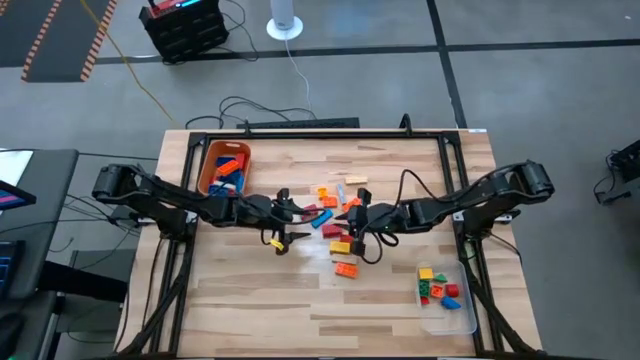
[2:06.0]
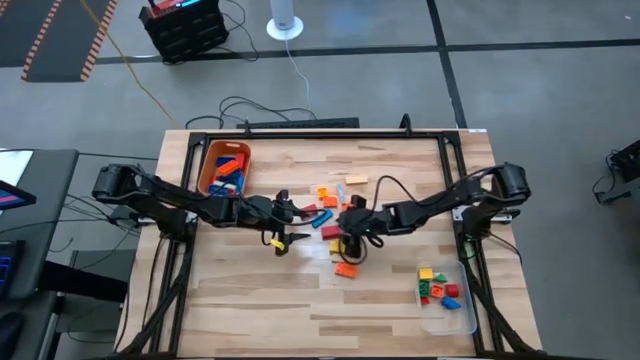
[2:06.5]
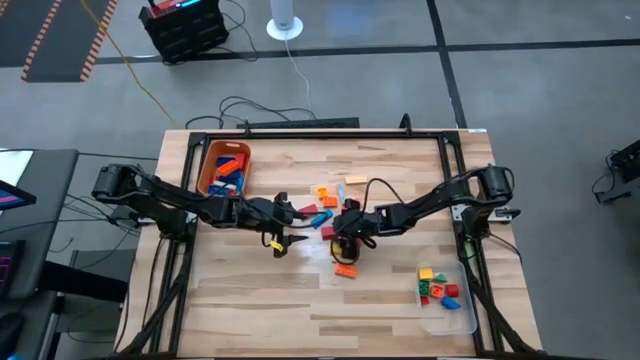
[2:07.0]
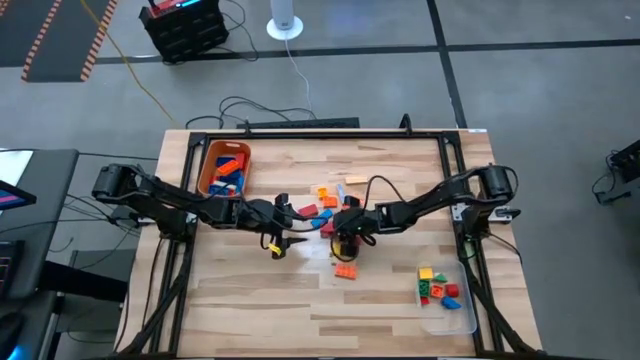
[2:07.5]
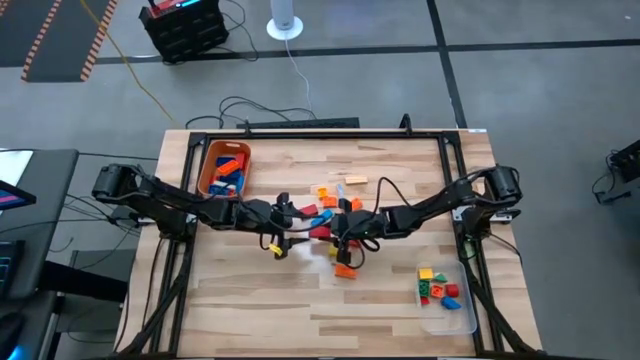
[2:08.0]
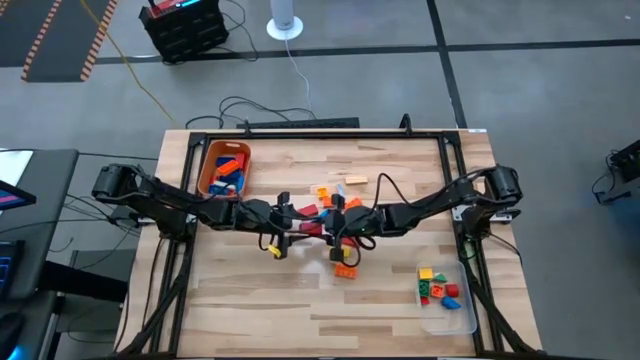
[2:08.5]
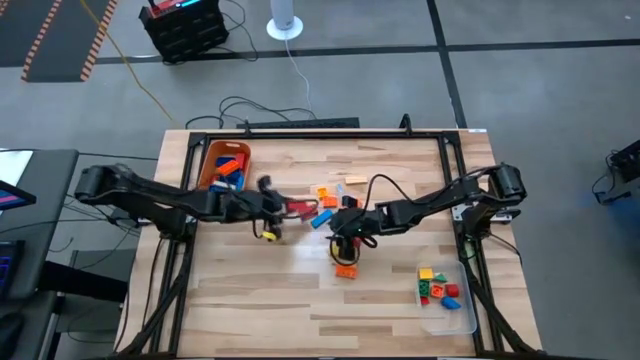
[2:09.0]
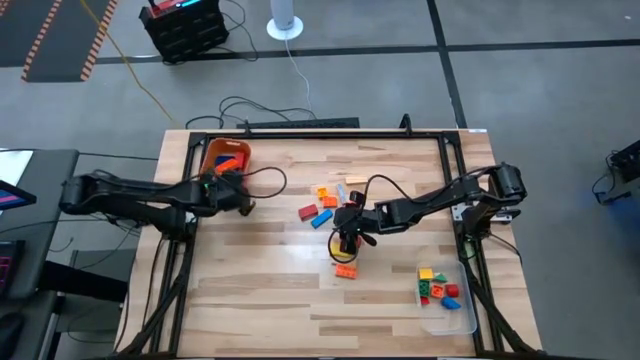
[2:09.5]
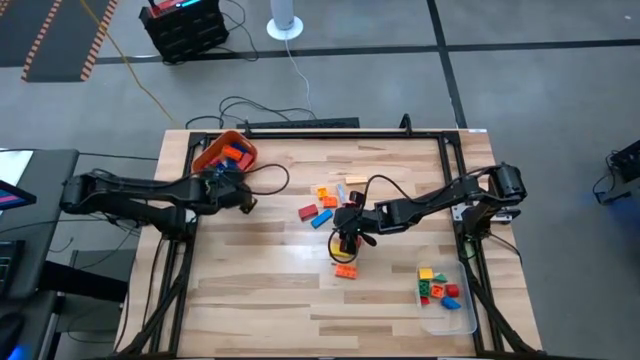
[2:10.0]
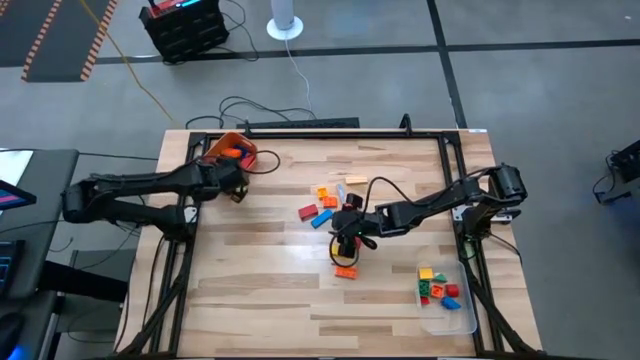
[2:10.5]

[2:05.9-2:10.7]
Task: Sort blocks by size
Put the large red wooden block into the orange bin

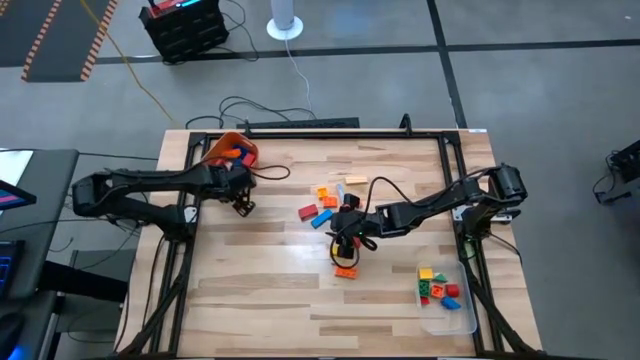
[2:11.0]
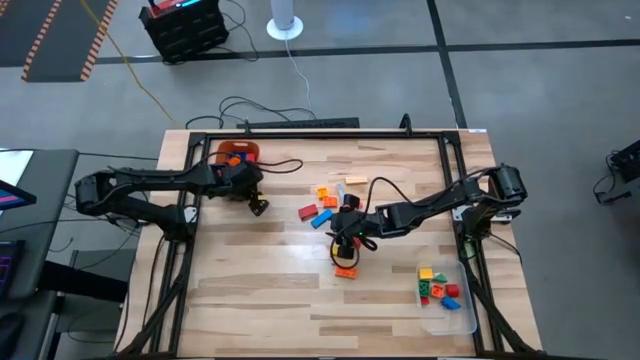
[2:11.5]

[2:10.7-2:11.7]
Adjust the orange bin

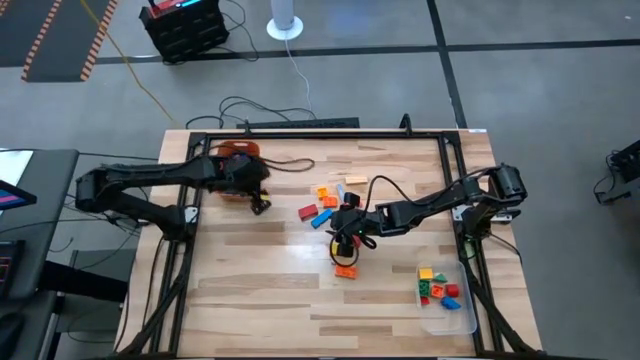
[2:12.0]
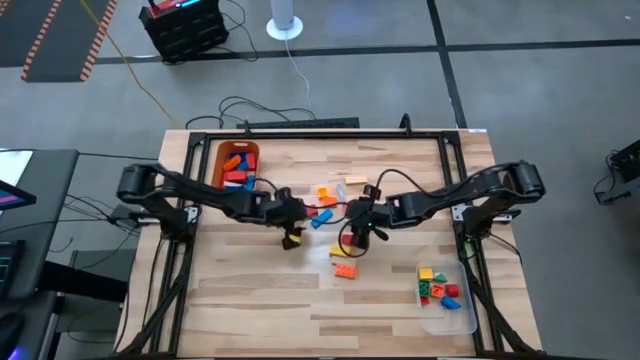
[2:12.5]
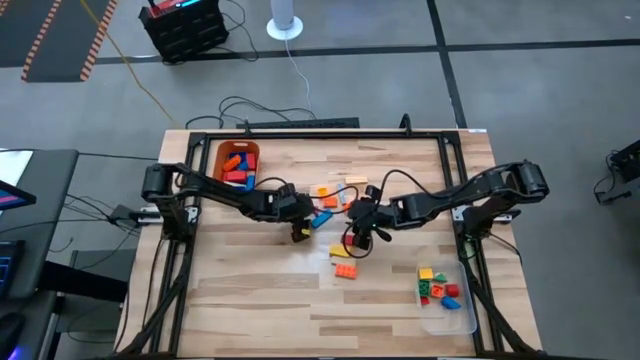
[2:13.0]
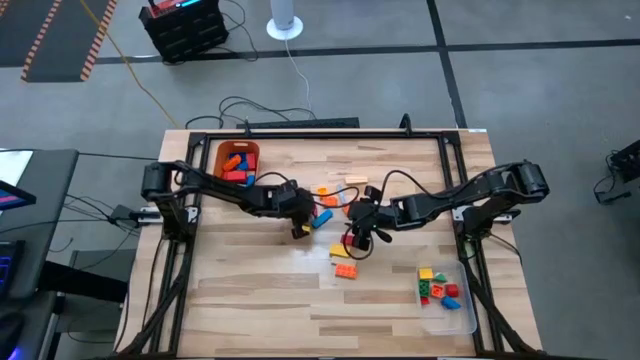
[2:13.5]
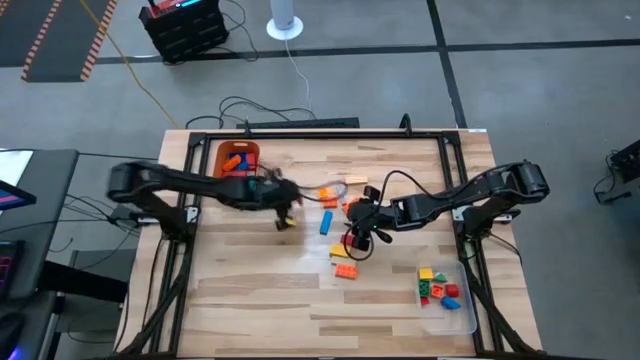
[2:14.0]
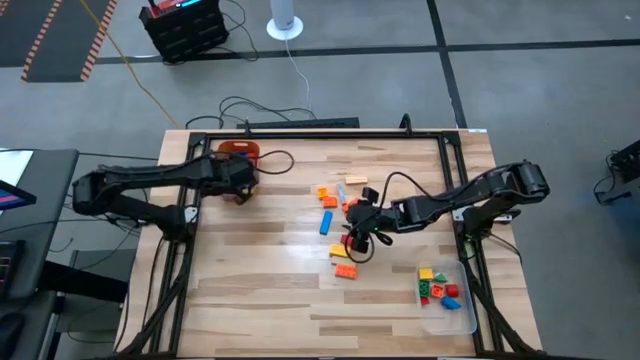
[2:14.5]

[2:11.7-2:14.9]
Put the large red wooden block into the orange bin

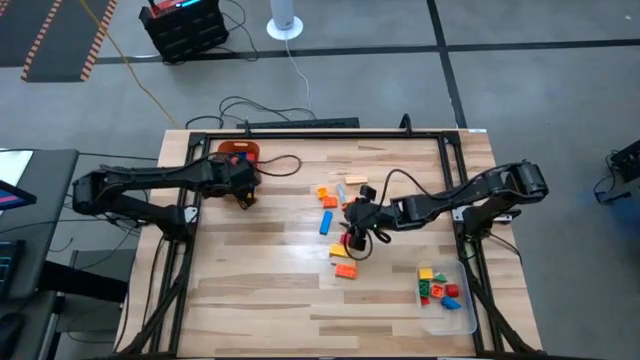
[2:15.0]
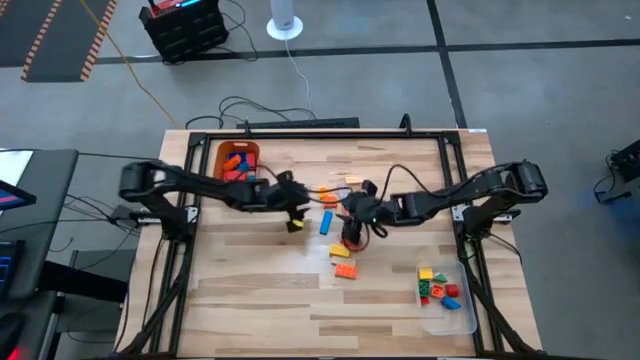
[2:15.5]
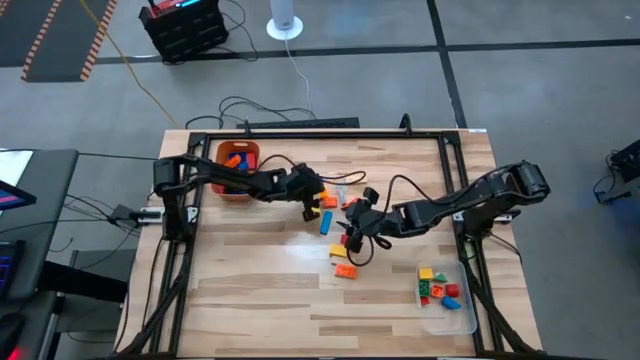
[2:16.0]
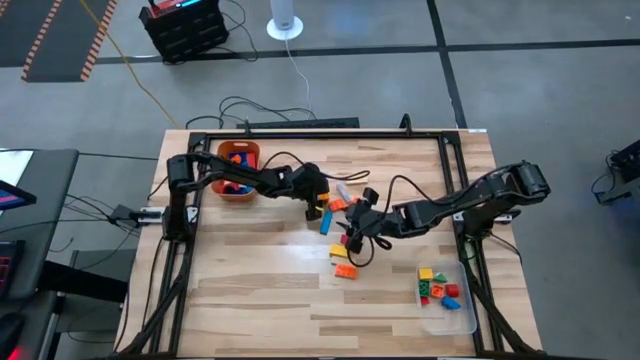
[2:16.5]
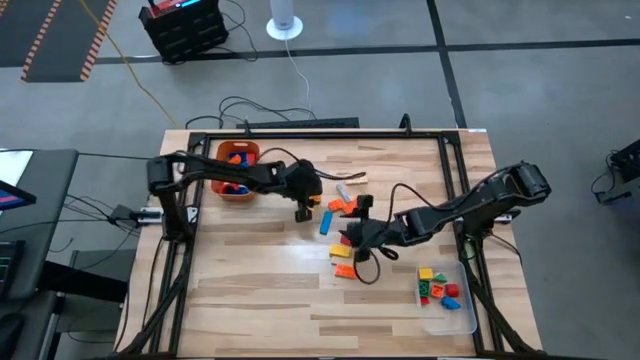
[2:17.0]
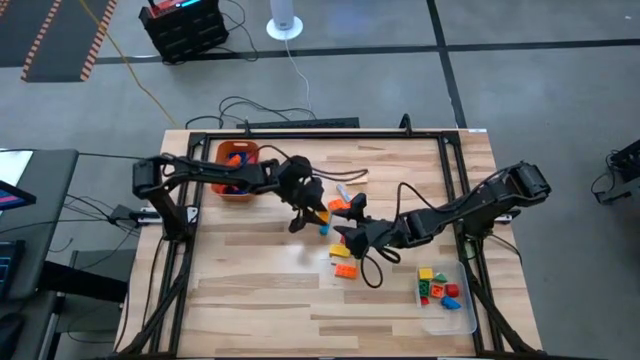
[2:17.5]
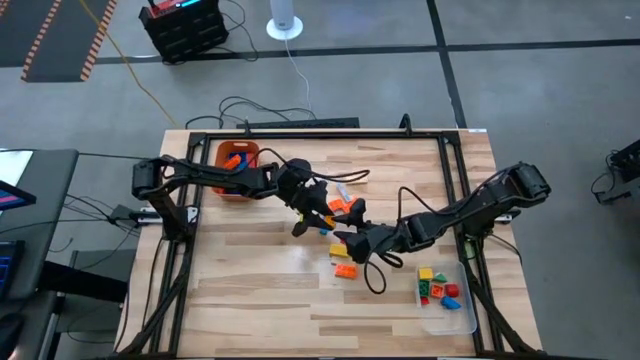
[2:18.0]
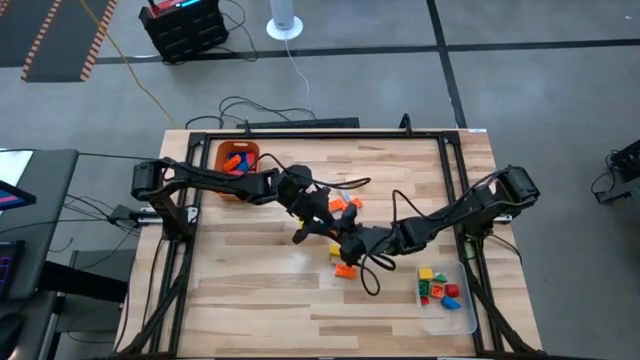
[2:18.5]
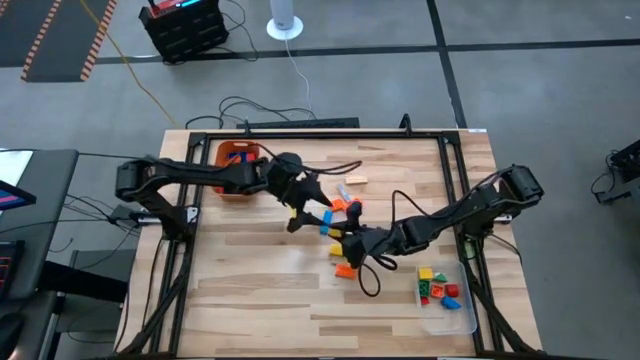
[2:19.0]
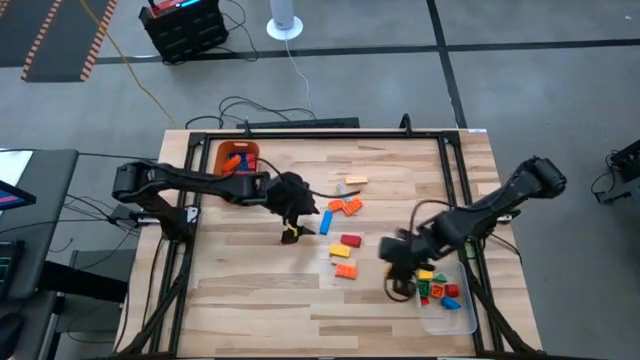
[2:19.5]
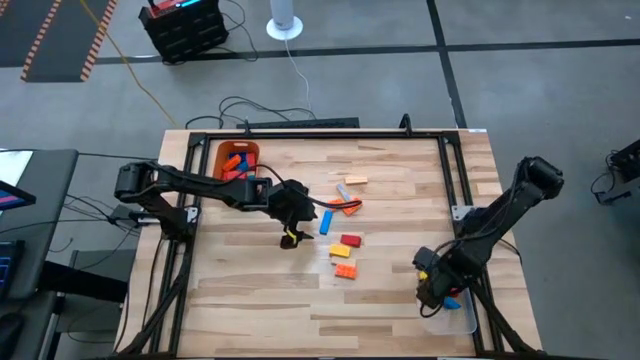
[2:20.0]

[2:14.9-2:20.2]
Put the small yellow game piece into the transparent bin

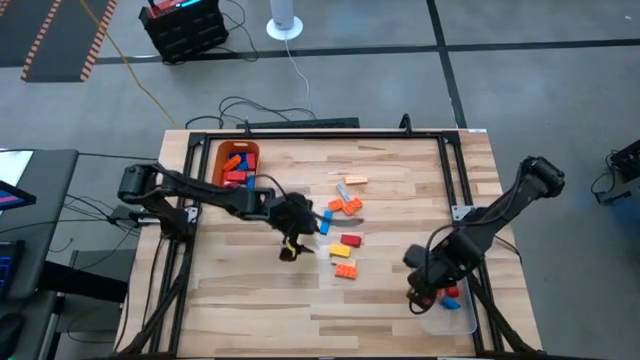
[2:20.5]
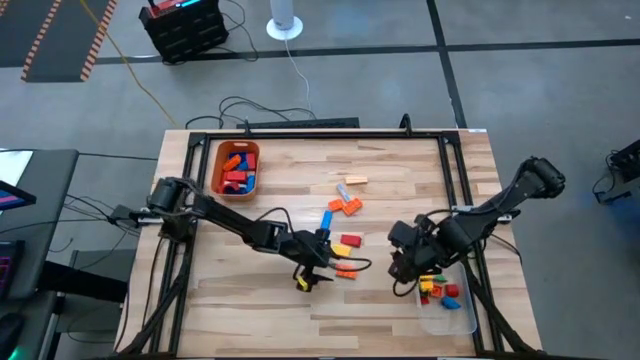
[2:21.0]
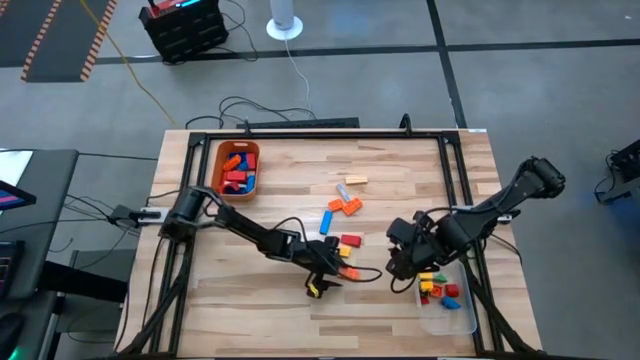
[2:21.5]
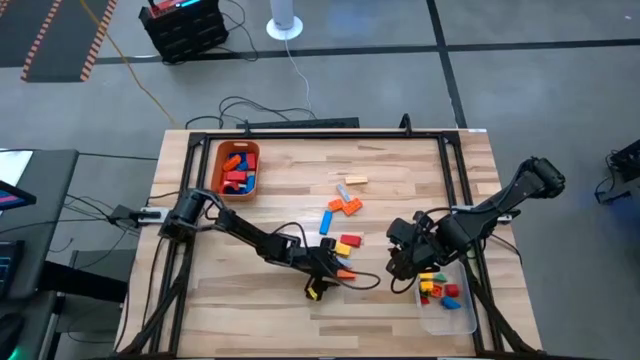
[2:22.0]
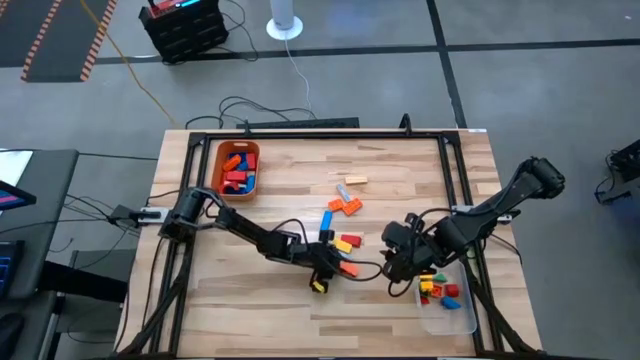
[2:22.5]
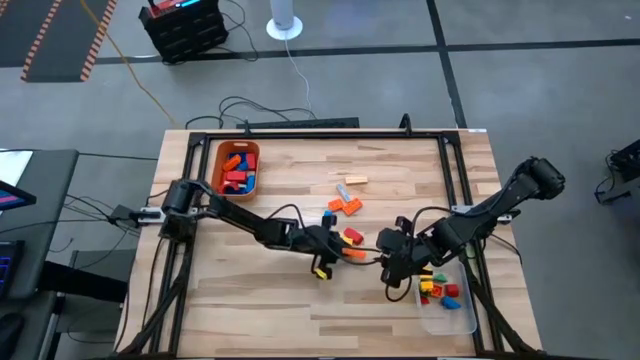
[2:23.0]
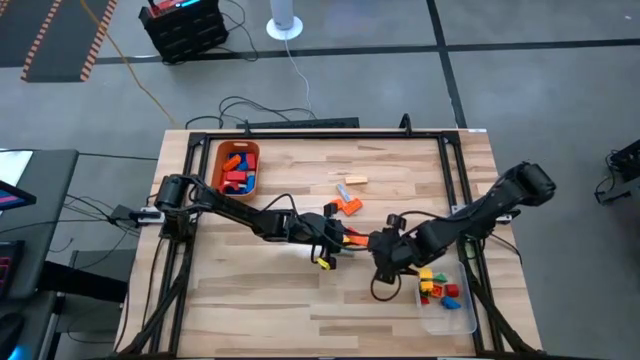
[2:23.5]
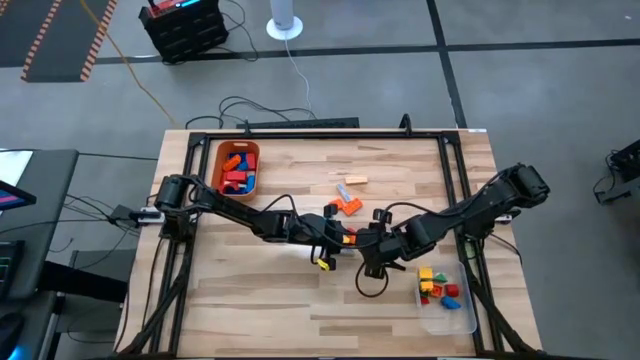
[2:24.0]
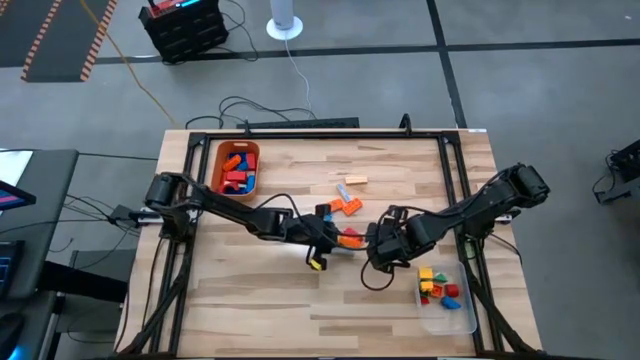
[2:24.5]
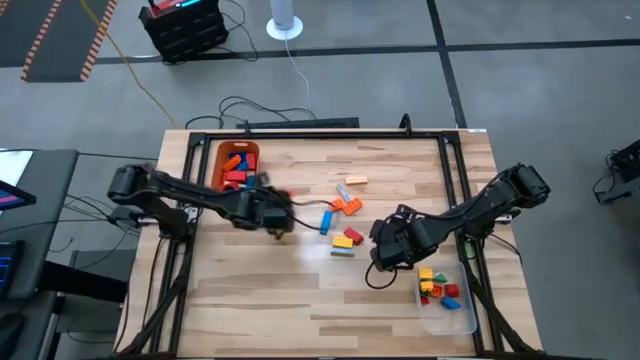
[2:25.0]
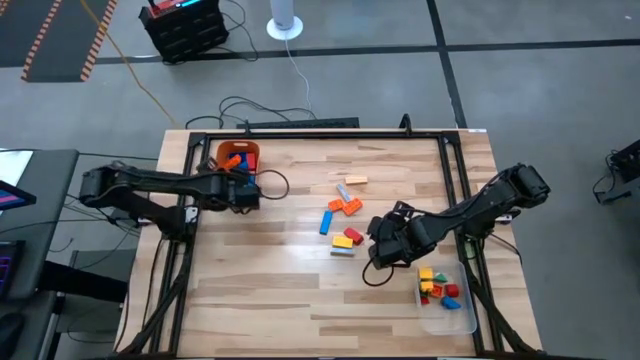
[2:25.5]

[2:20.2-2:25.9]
Put the large orange game piece into the orange bin
